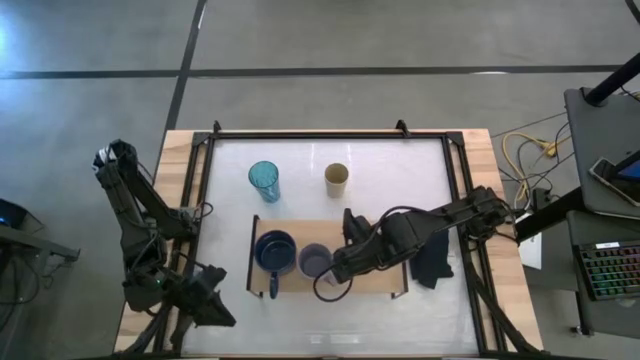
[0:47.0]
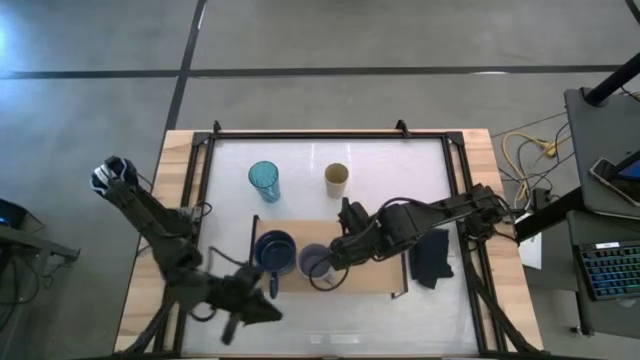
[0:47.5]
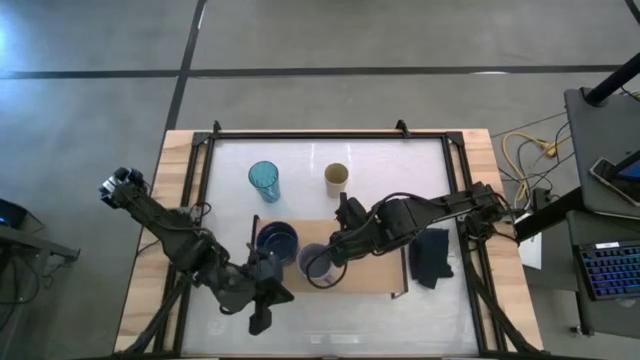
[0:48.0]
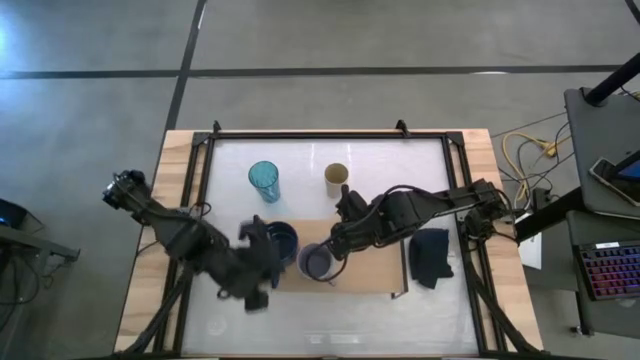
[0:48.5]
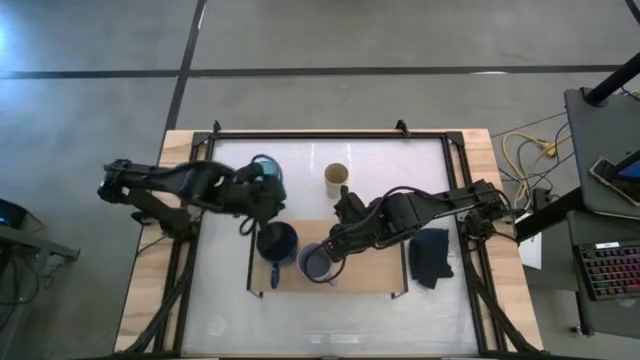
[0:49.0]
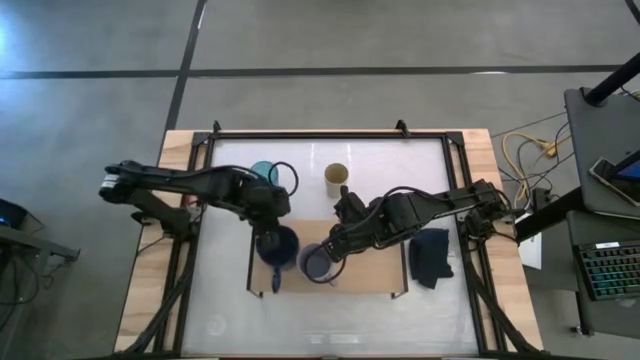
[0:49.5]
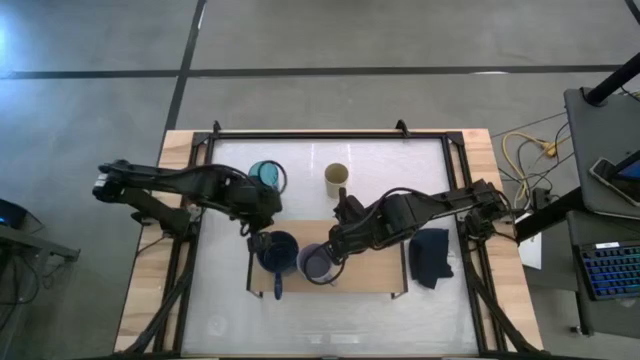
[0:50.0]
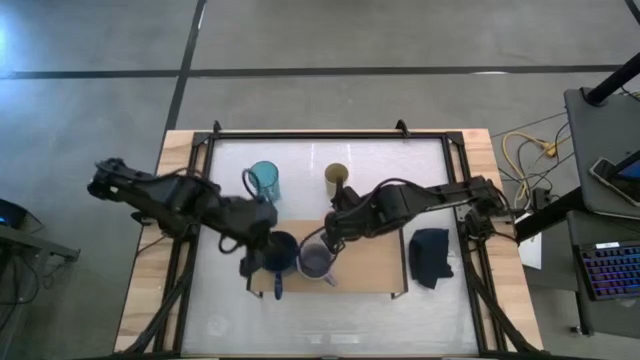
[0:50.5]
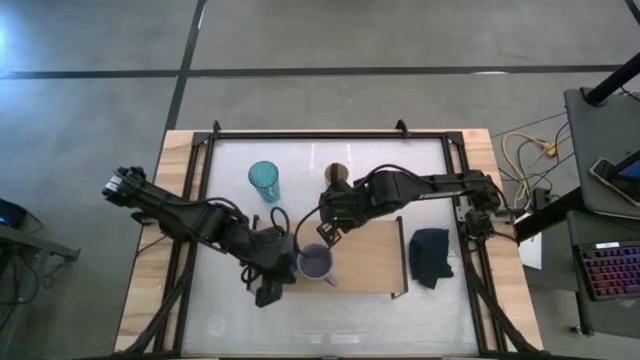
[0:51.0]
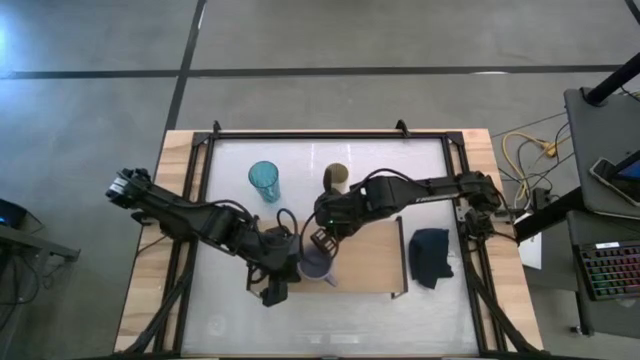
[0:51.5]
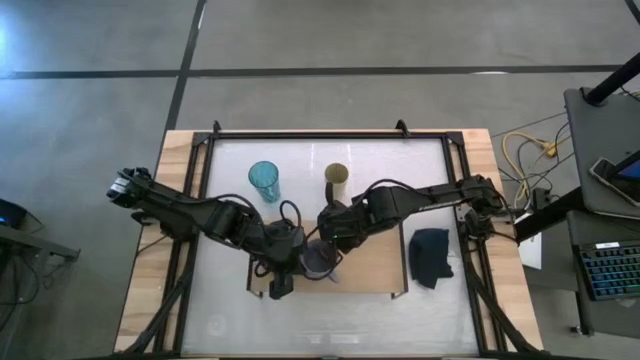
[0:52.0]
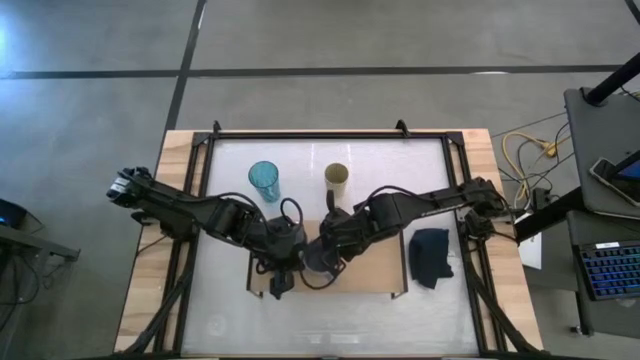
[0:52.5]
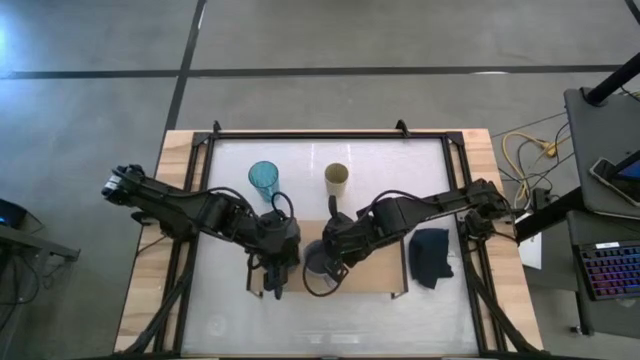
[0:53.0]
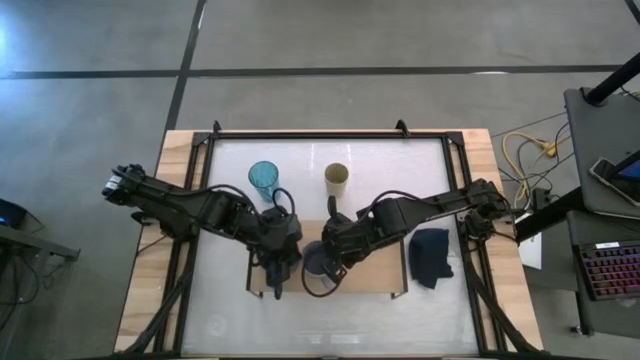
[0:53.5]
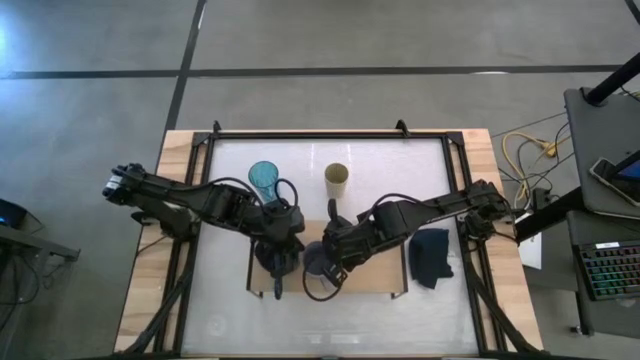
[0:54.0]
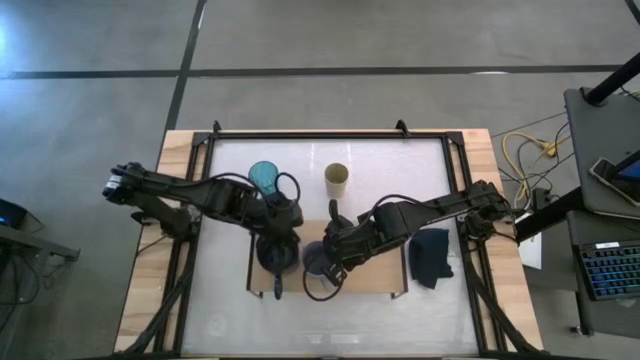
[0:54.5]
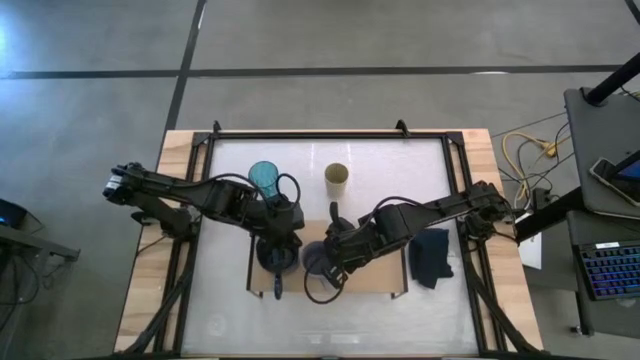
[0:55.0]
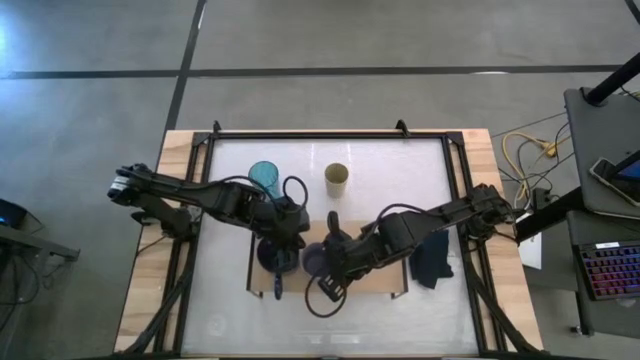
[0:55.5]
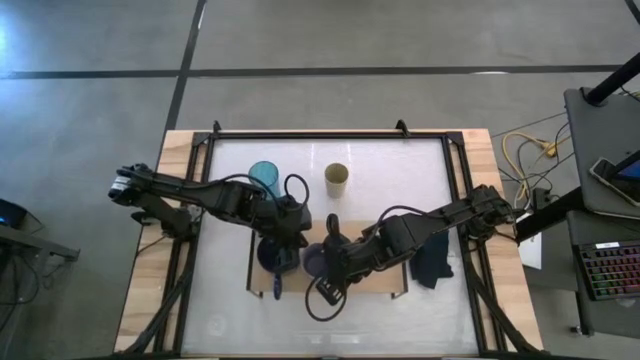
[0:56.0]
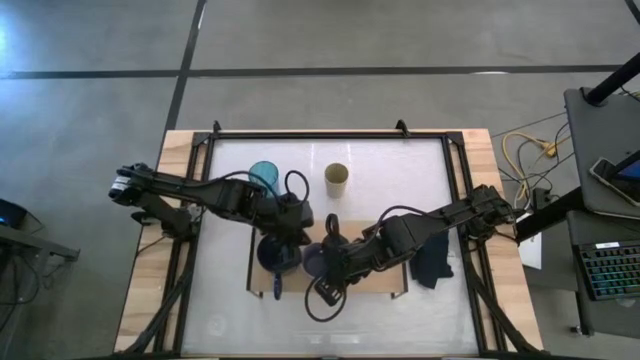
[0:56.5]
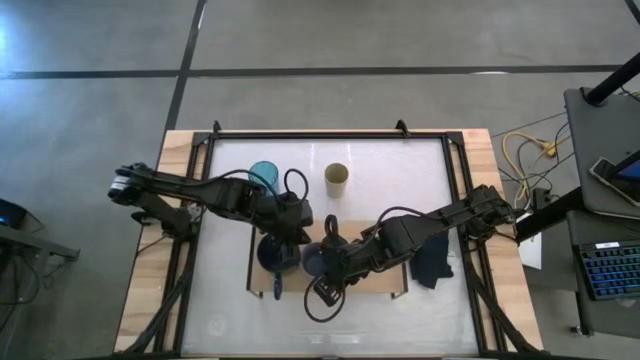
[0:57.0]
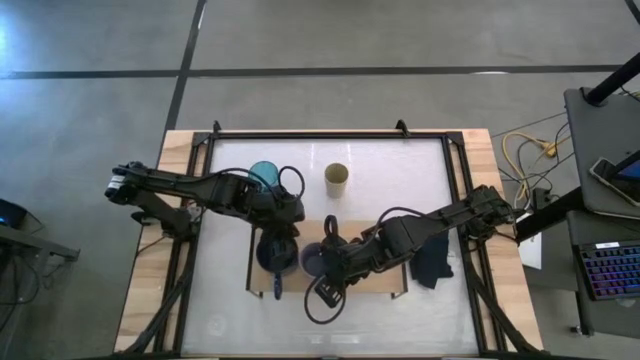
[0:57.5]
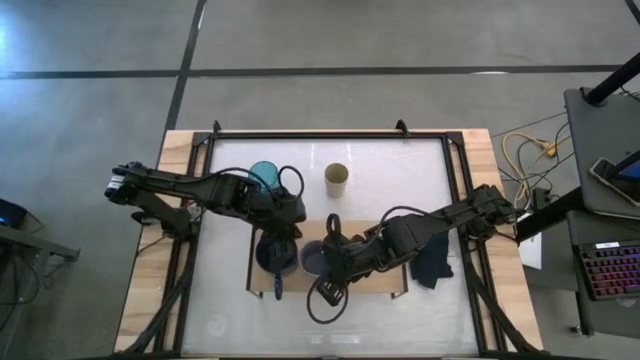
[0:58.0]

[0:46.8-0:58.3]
Task: Stack small to large cups/mugs on shelf
Adjust the mugs on the shelf

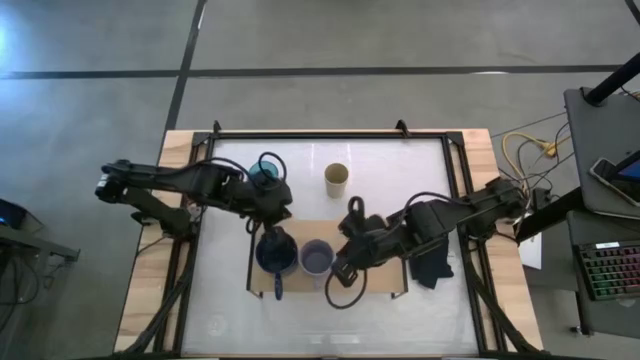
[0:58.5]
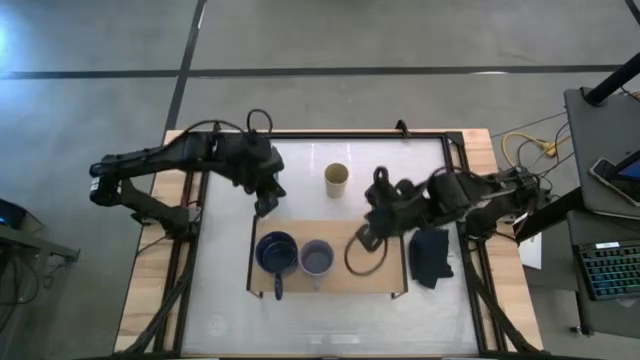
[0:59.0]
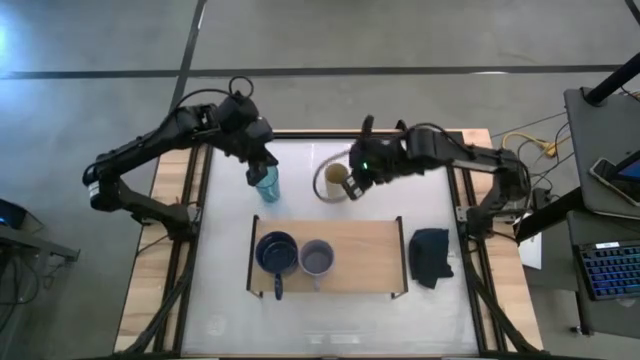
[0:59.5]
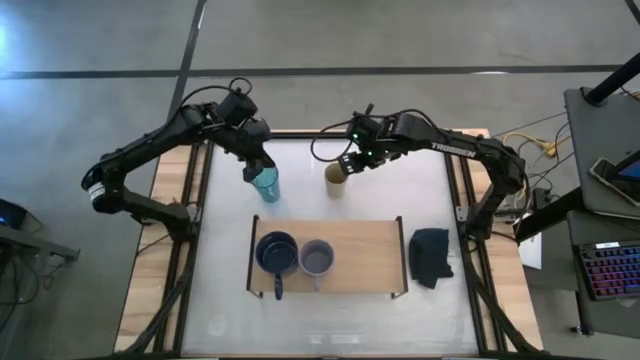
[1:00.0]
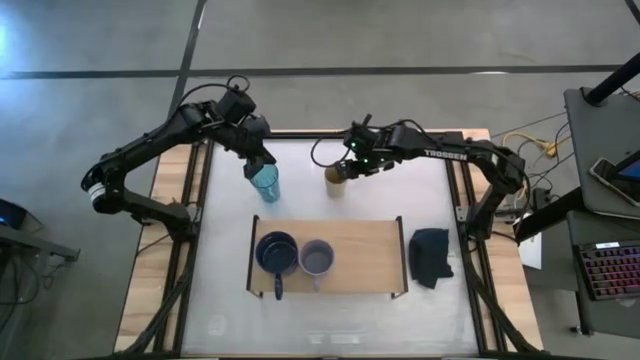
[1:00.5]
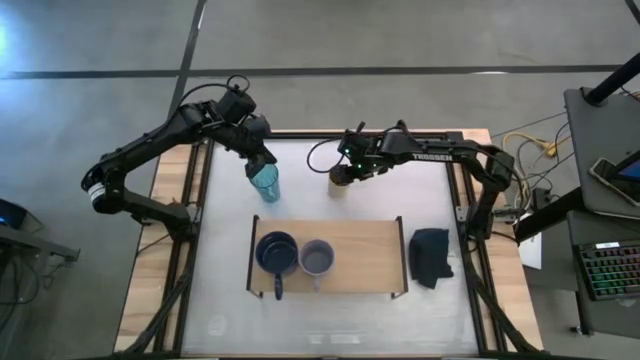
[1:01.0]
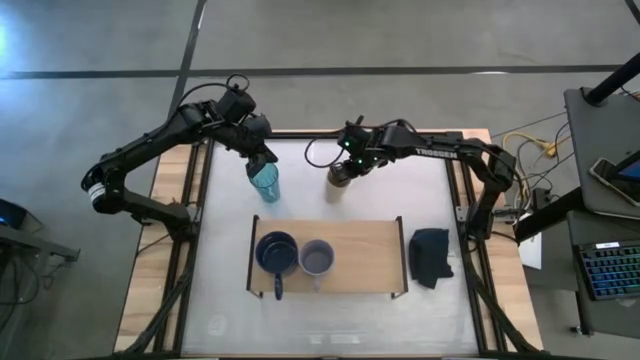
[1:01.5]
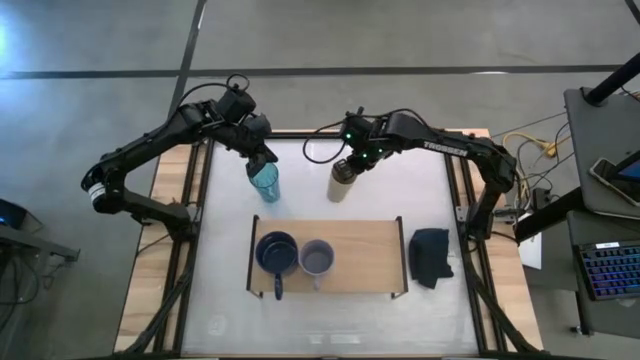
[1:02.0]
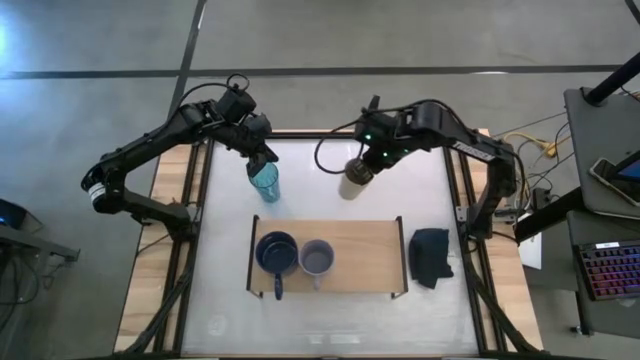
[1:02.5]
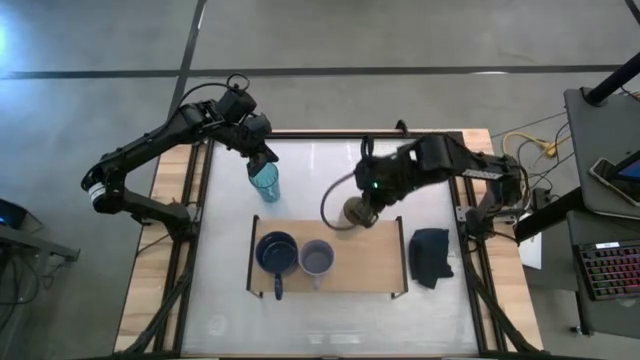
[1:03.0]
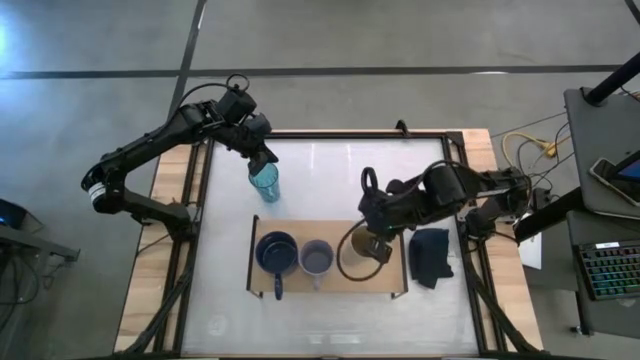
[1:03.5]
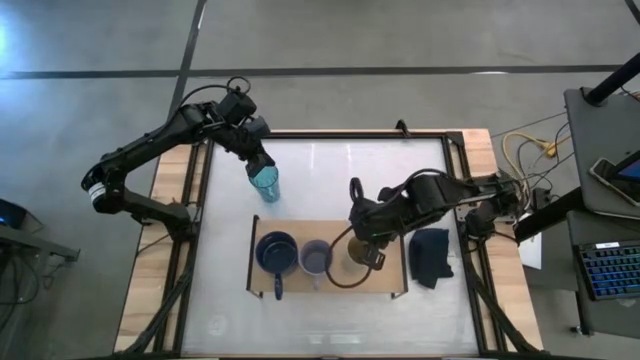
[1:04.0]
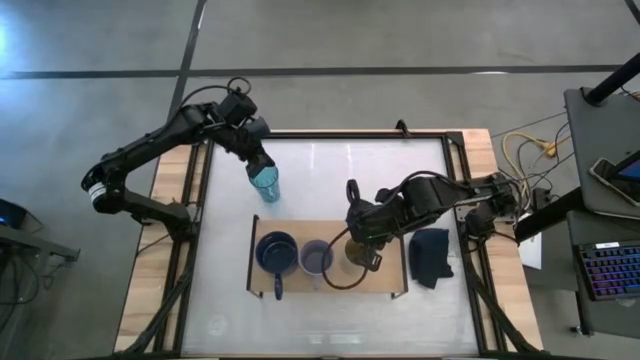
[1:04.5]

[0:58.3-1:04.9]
Put the white cup on the shelf

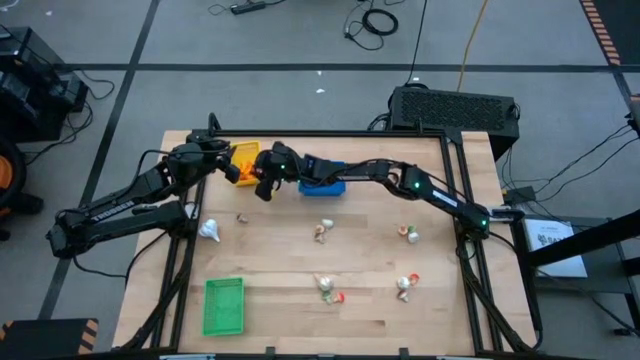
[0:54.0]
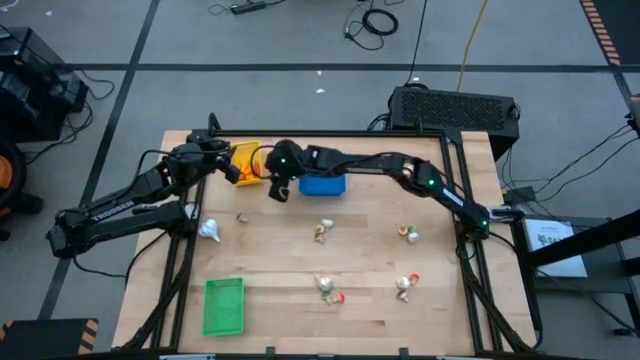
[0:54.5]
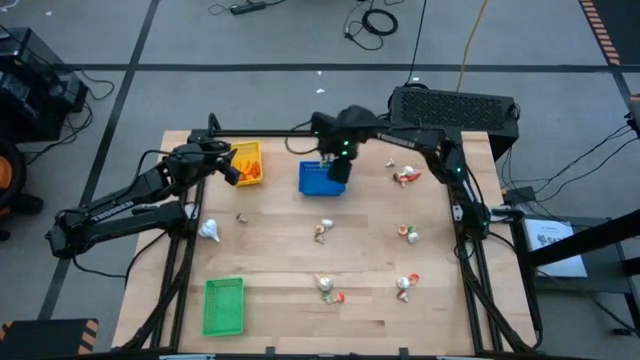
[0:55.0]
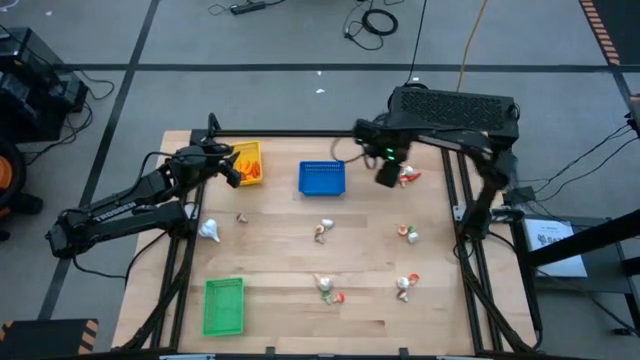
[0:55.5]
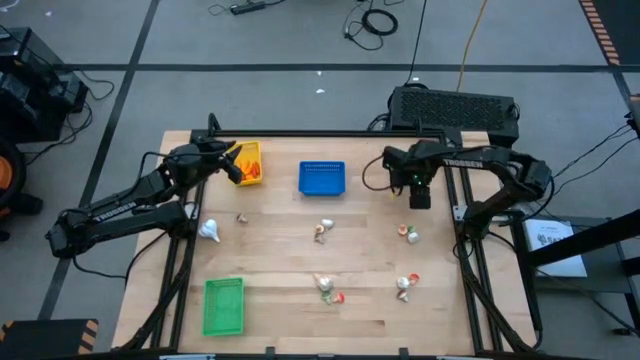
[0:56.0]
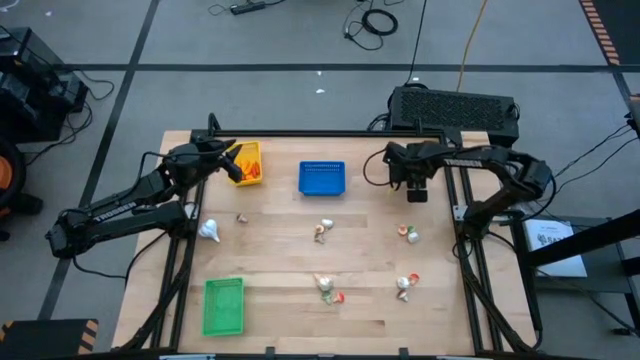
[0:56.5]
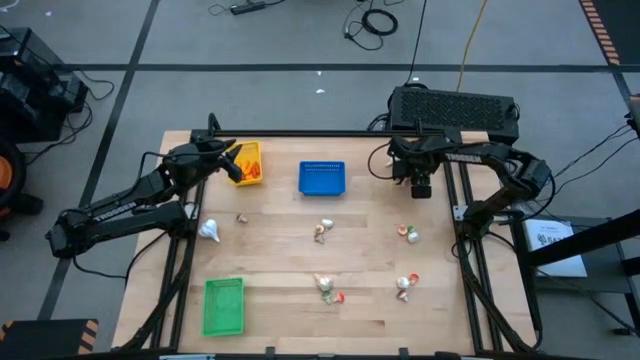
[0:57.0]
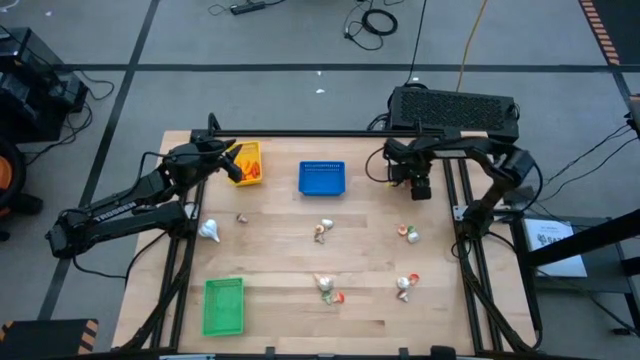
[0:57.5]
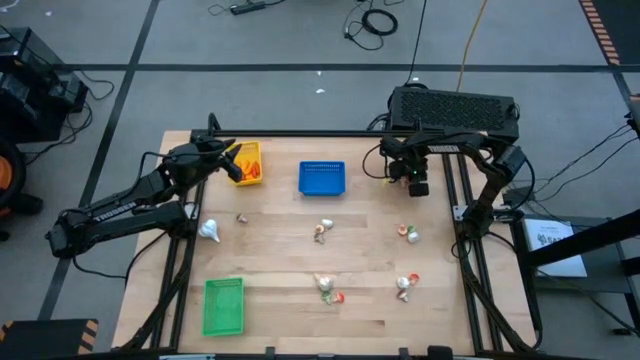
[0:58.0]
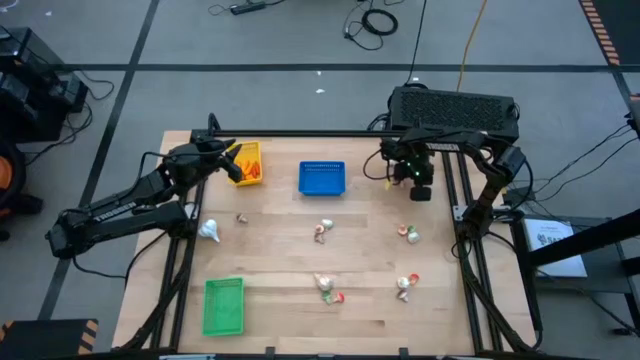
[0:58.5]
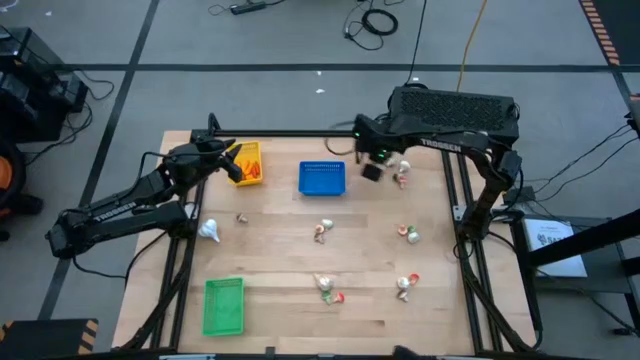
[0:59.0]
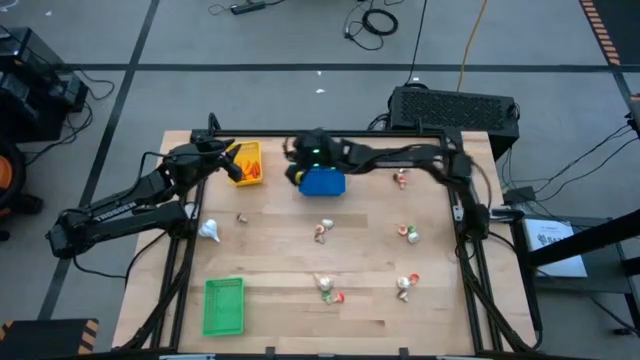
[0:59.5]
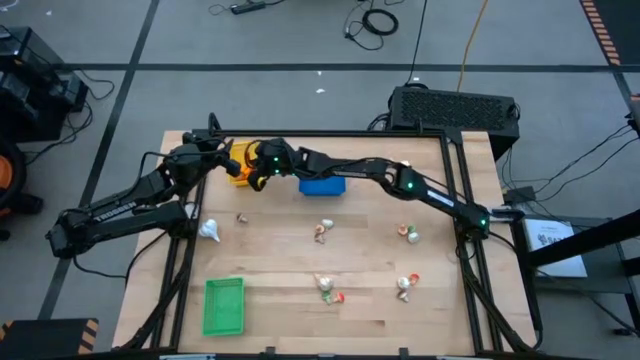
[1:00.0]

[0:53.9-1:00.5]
Task: Sort produce into baskets
Put the orange chili pepper into the yellow bin
